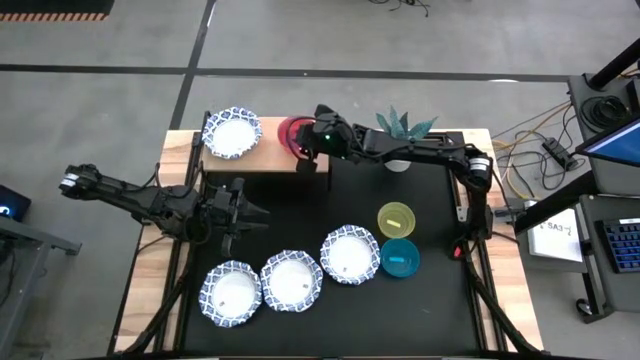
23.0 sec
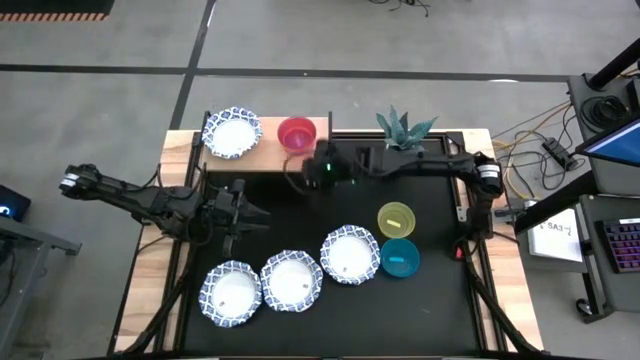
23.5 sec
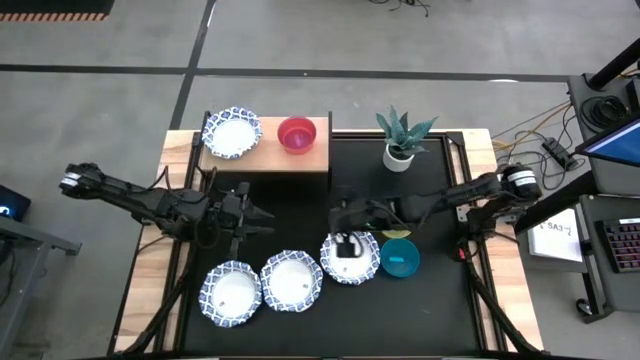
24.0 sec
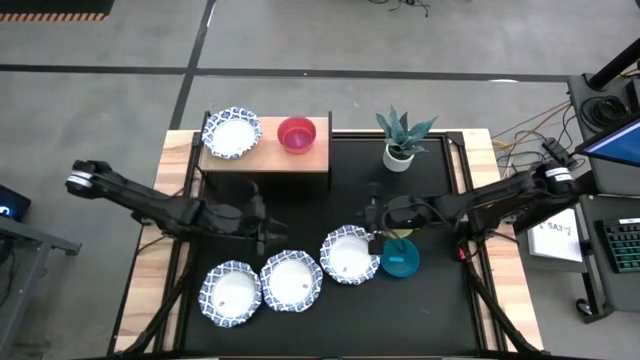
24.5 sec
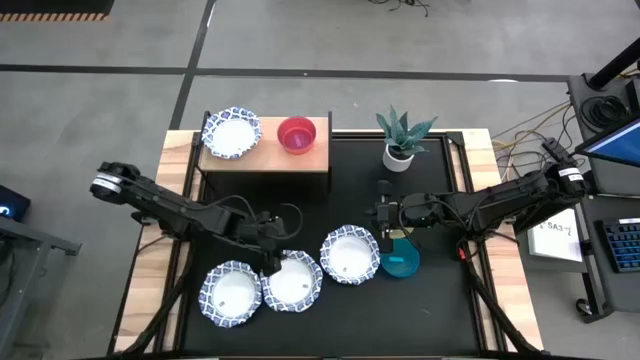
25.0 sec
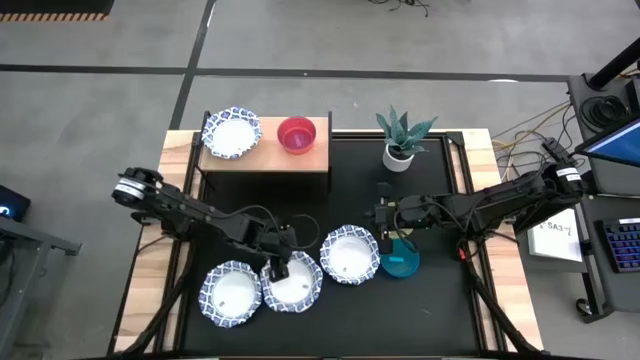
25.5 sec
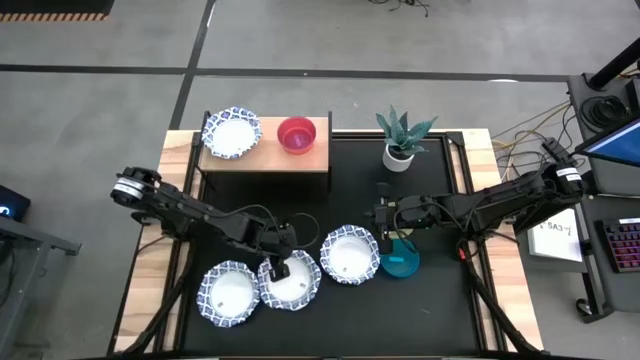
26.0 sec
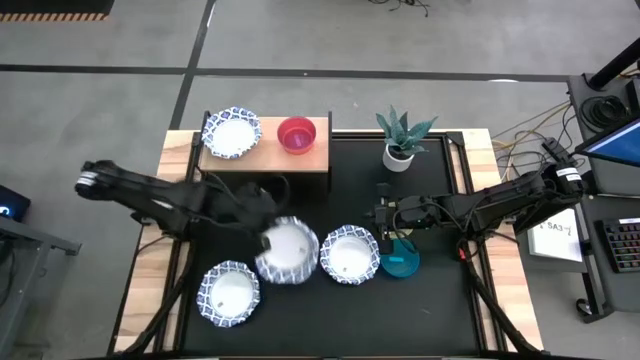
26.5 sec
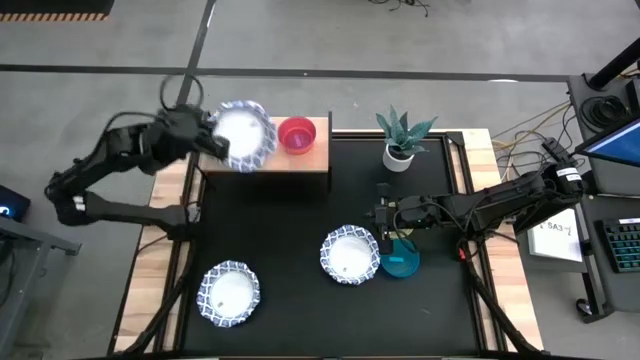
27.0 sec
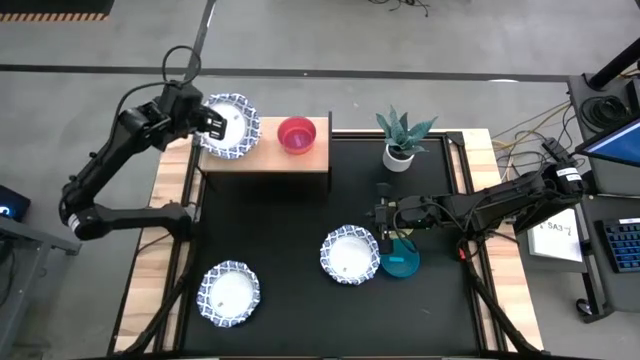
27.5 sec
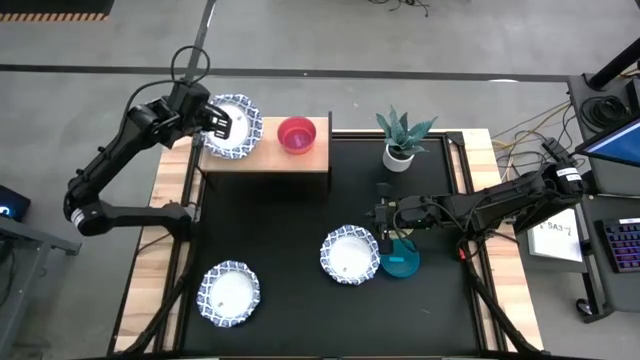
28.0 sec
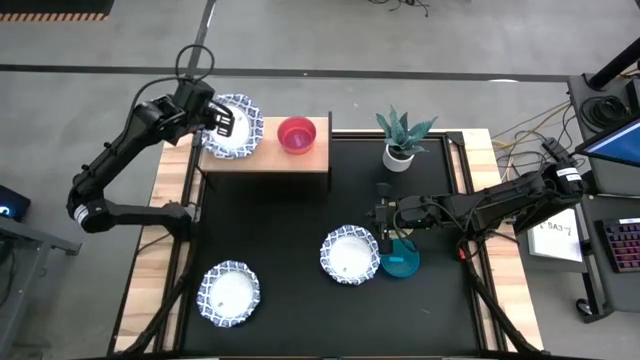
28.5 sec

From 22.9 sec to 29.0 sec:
Task: Place and stack bowls onto a shelf
Stack the blue bowl on top of the blue bowl on the shelf

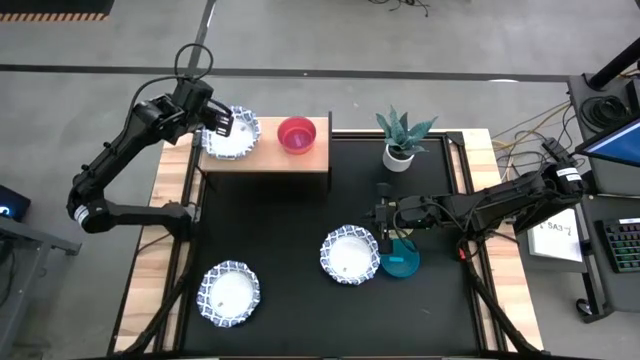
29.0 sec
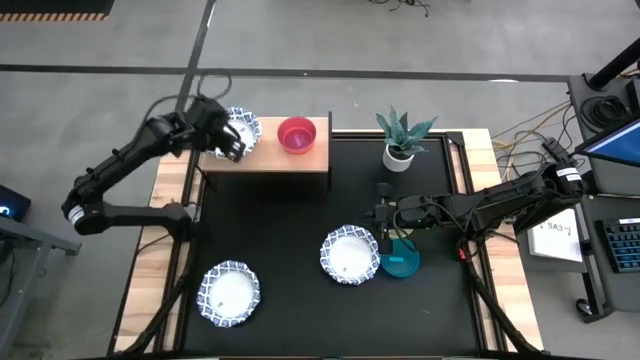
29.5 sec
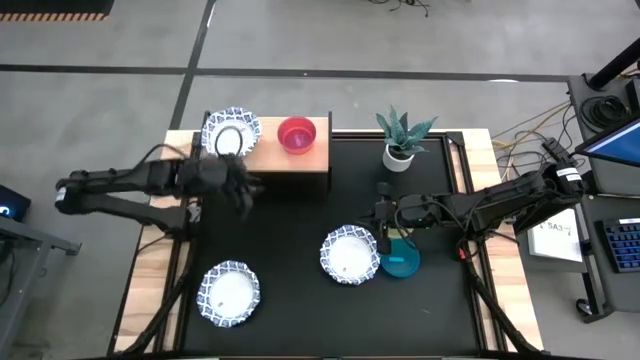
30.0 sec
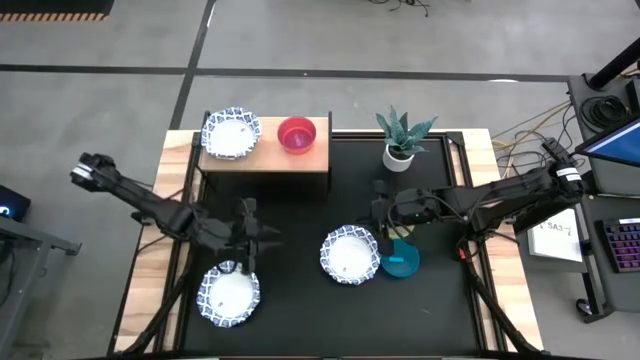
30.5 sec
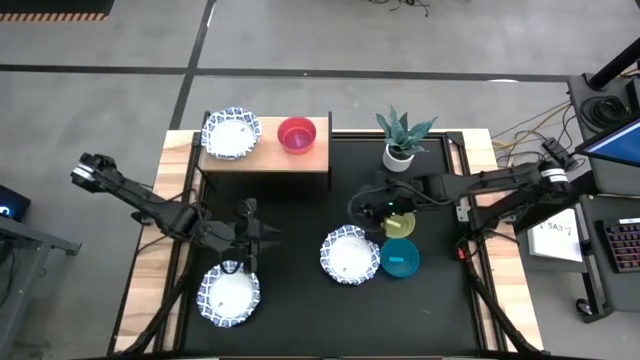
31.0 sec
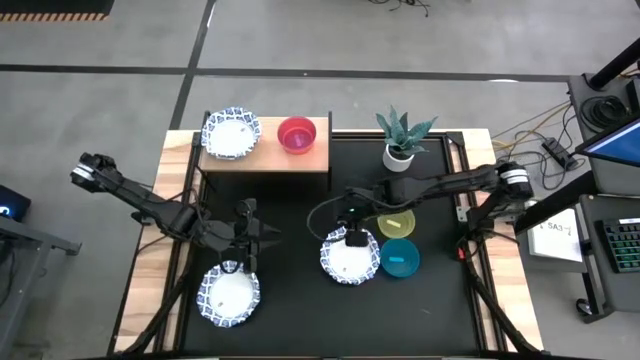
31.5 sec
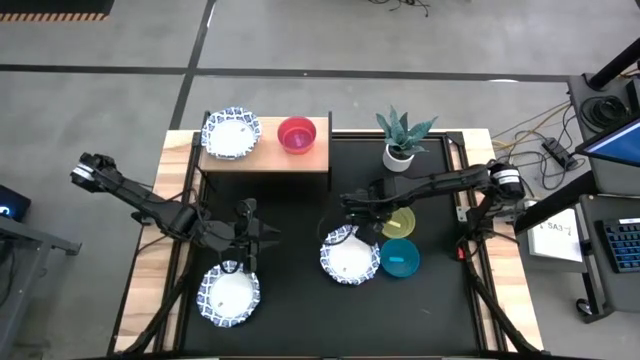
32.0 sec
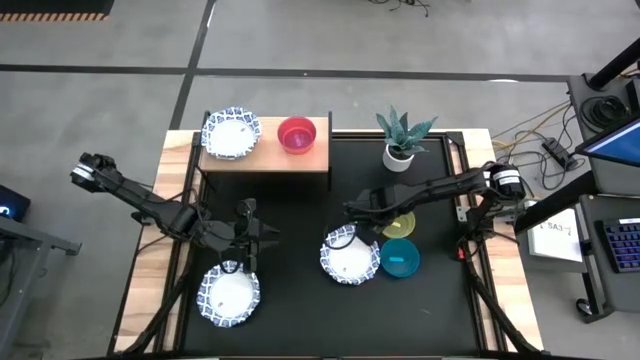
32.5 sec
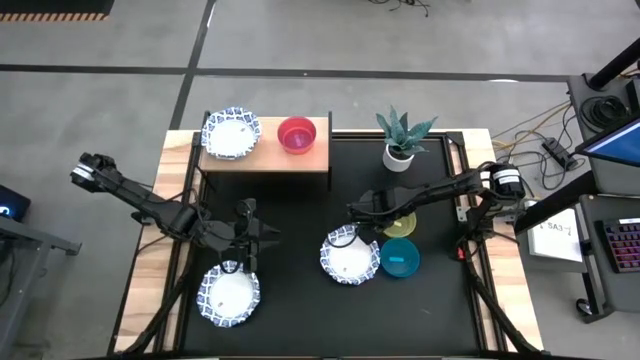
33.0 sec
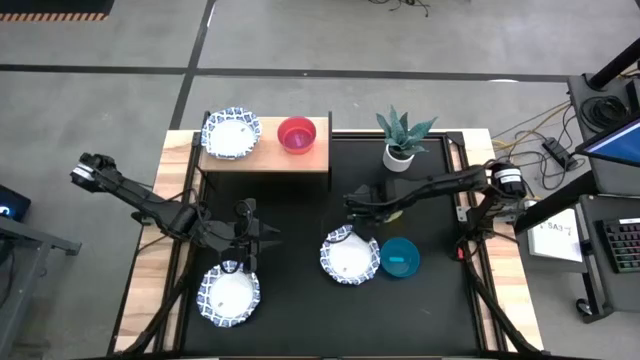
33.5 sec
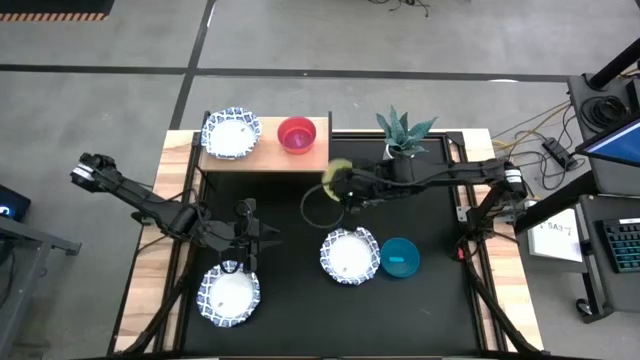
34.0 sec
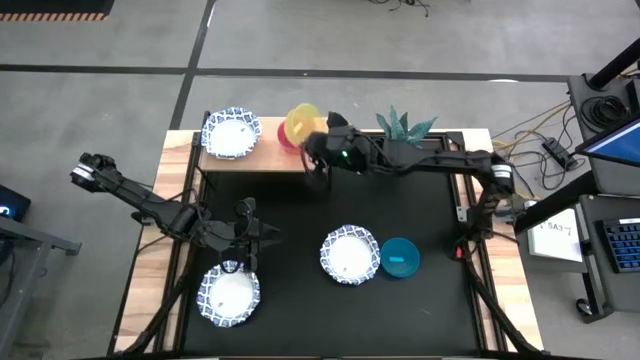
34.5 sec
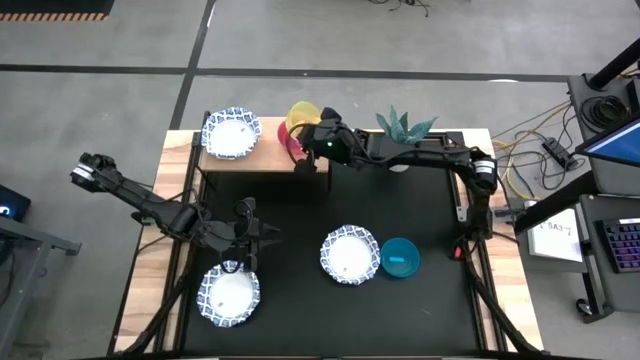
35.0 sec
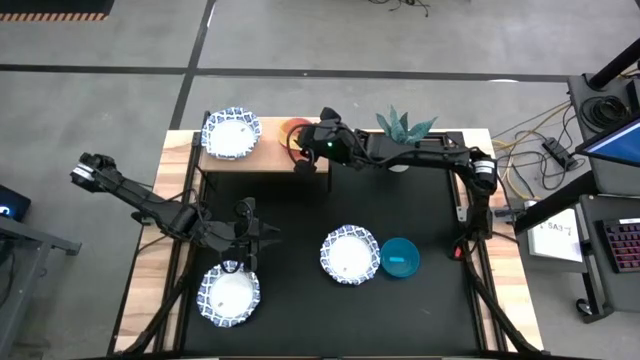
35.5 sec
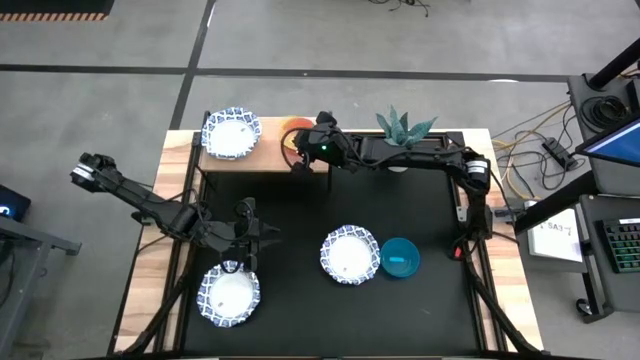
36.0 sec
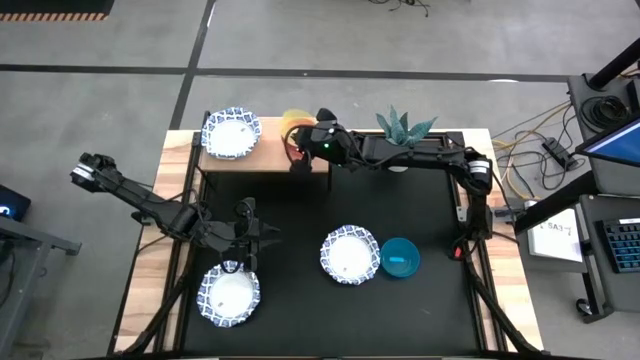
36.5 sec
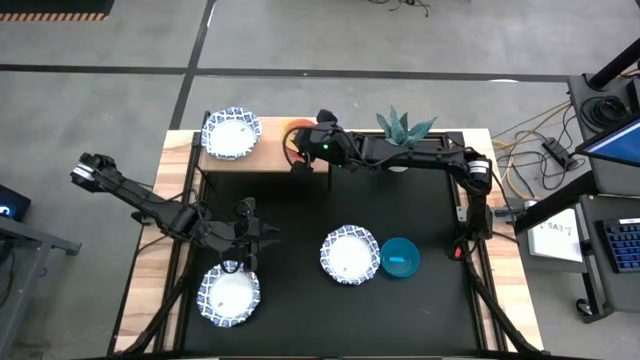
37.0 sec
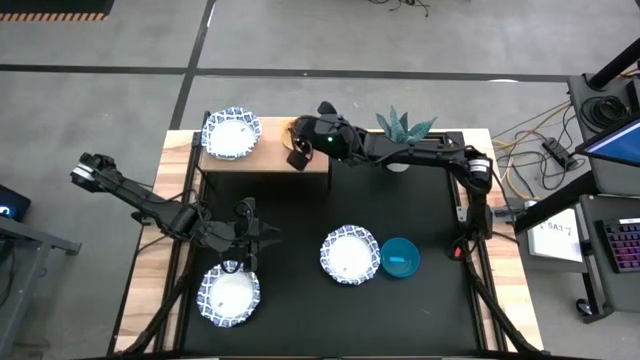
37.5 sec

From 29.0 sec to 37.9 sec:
Stack the yellow bowl on top of the purple bowl on the shelf

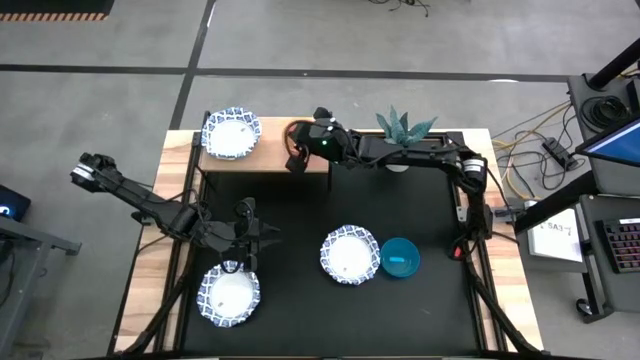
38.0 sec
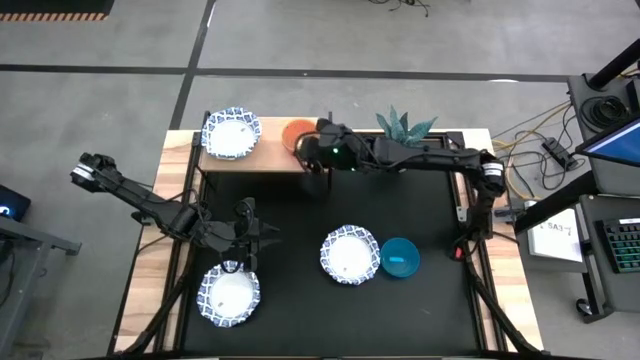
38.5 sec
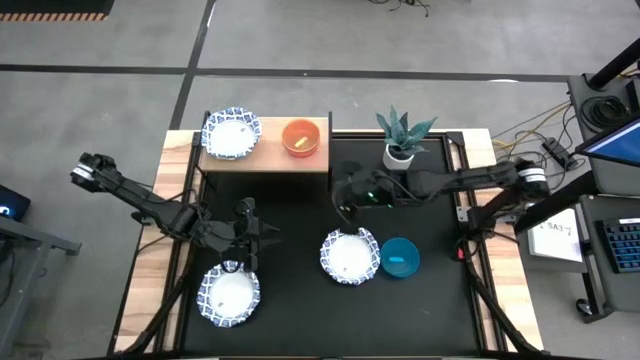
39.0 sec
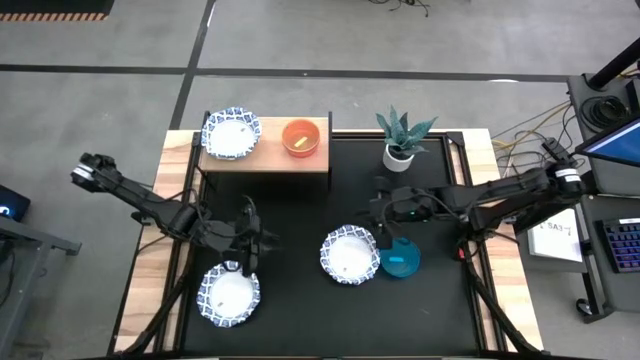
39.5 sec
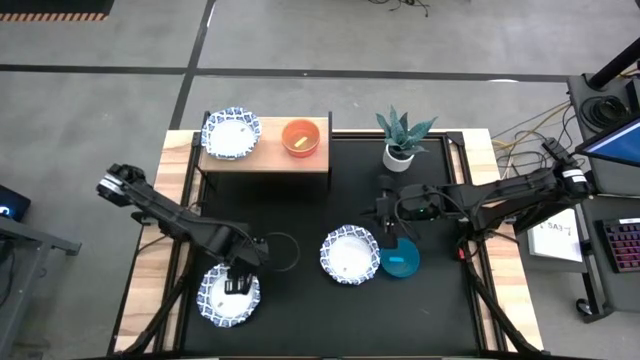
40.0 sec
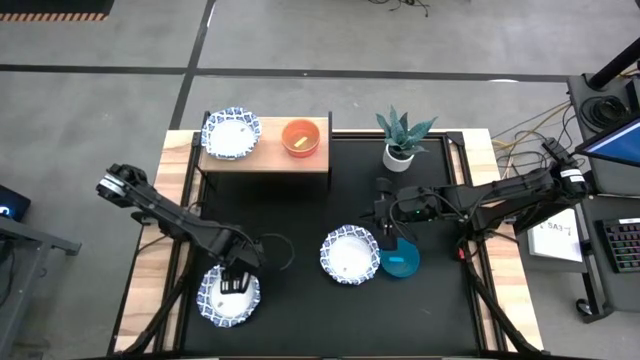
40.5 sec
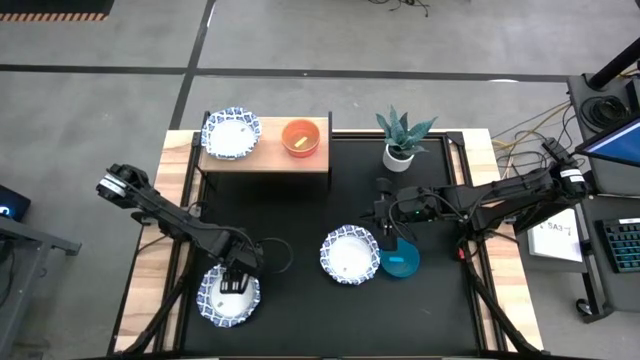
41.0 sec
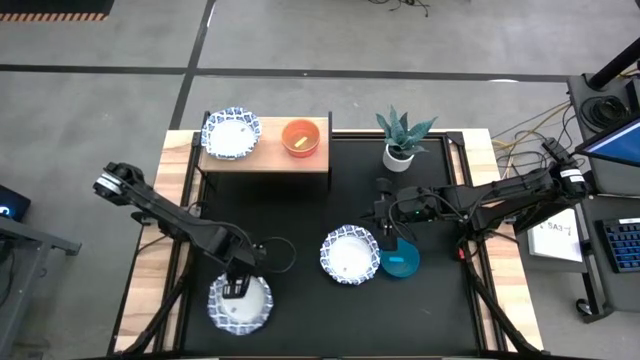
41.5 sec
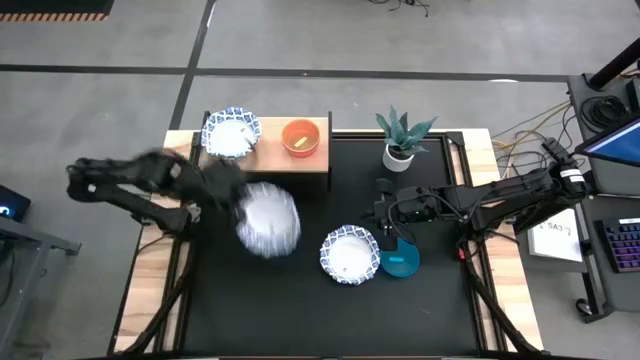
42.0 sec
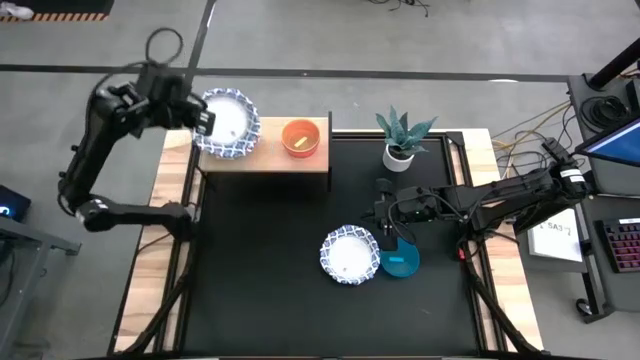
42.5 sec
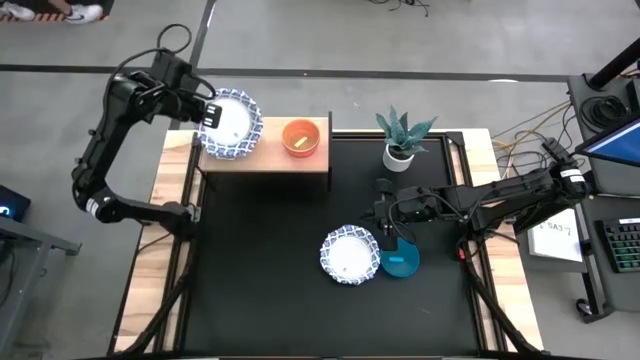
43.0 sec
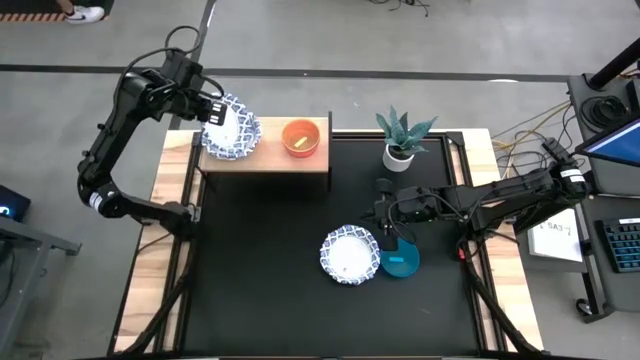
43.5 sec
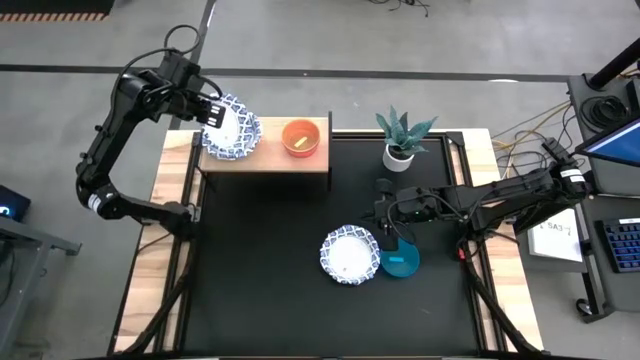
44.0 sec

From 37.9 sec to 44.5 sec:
Stack the blue bowl on top of the blue bowl on the shelf
